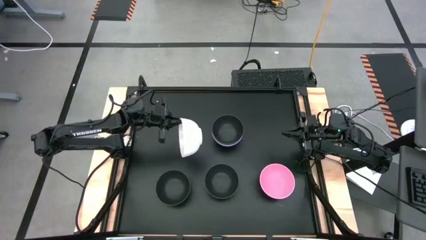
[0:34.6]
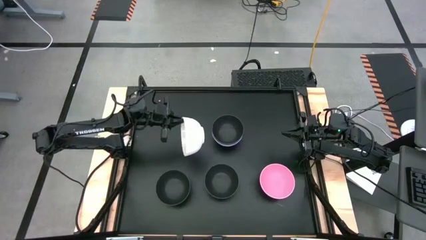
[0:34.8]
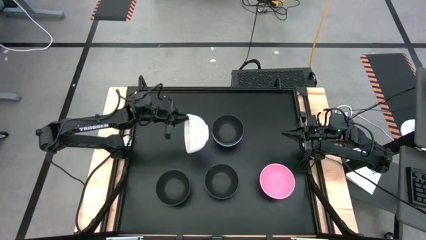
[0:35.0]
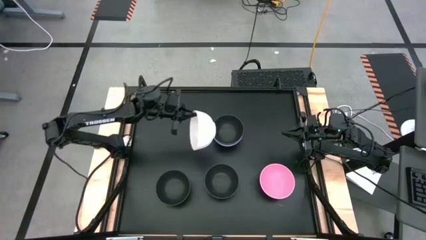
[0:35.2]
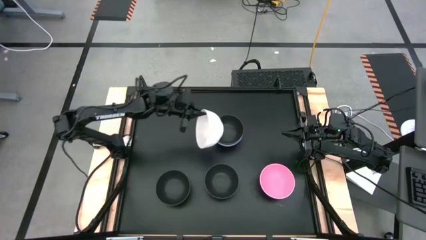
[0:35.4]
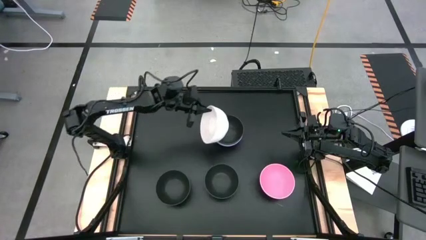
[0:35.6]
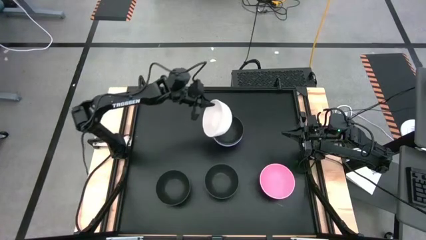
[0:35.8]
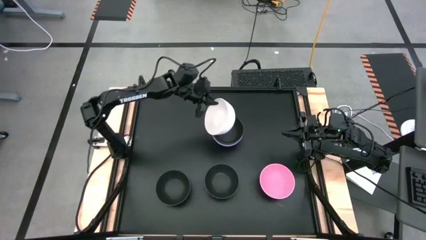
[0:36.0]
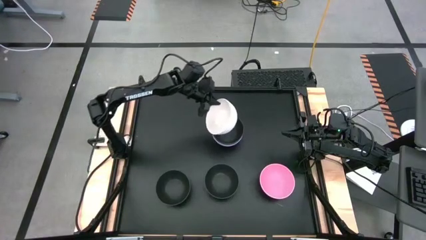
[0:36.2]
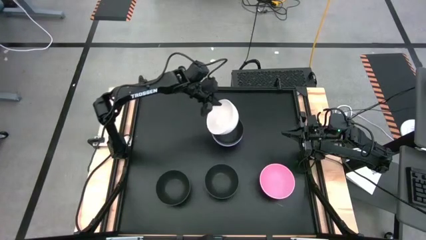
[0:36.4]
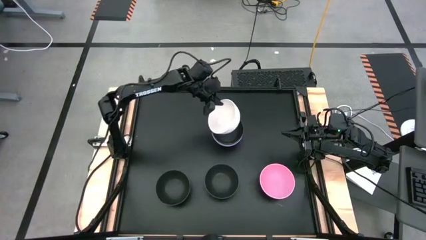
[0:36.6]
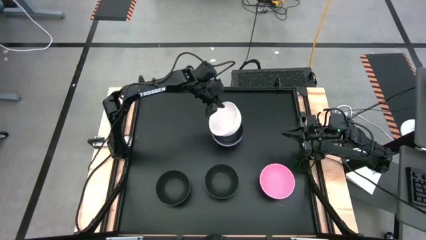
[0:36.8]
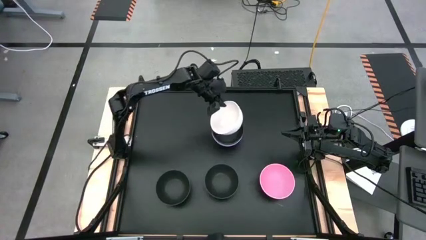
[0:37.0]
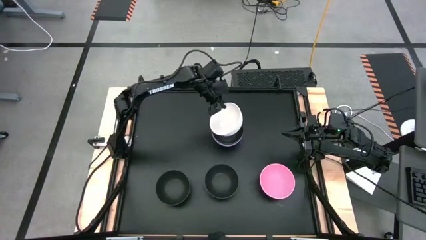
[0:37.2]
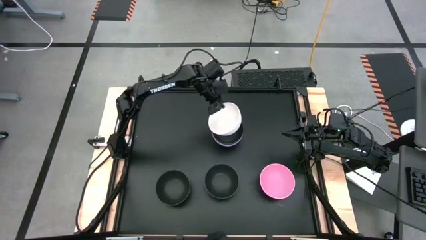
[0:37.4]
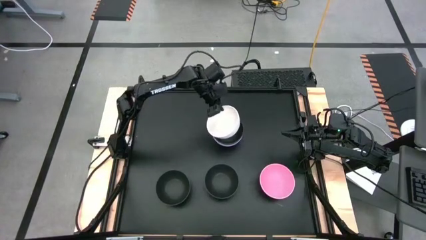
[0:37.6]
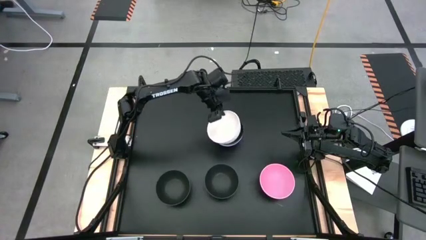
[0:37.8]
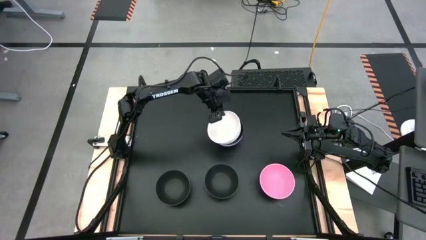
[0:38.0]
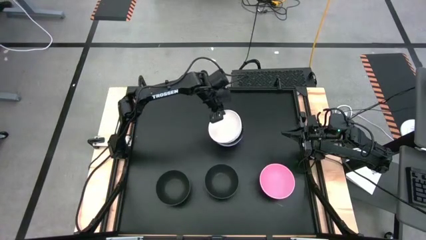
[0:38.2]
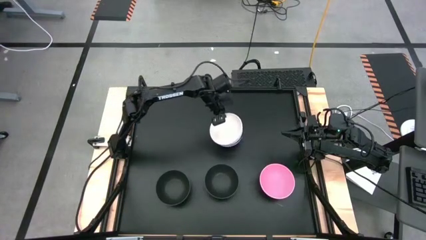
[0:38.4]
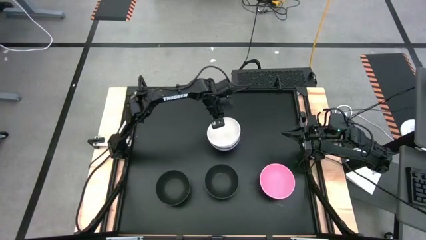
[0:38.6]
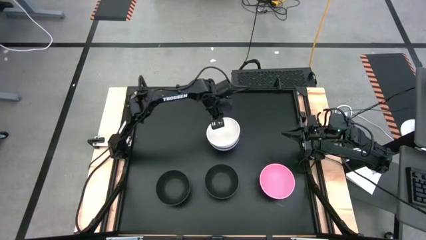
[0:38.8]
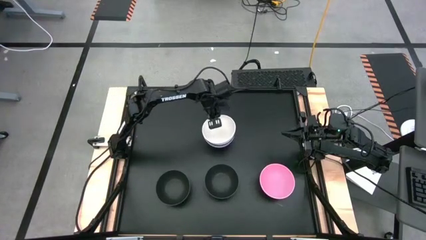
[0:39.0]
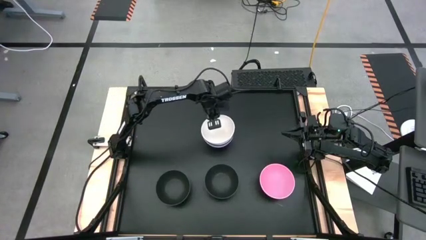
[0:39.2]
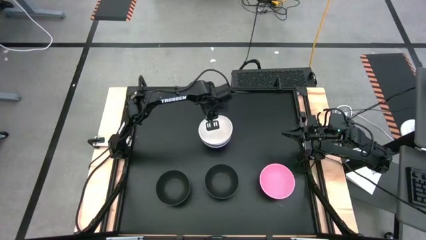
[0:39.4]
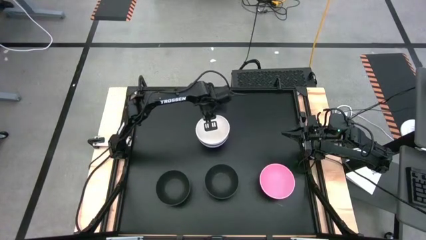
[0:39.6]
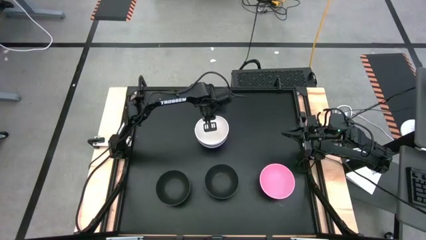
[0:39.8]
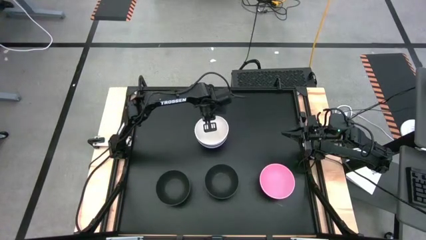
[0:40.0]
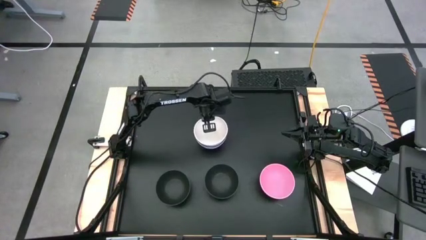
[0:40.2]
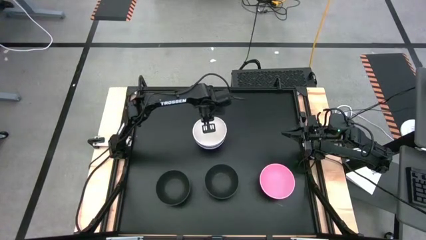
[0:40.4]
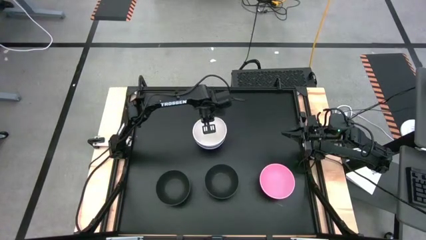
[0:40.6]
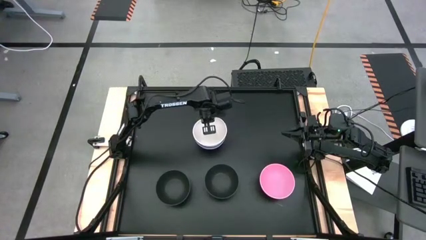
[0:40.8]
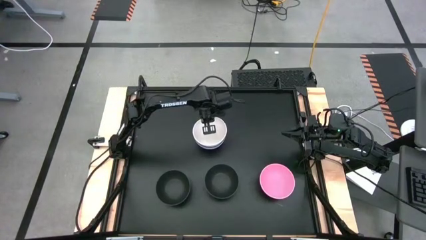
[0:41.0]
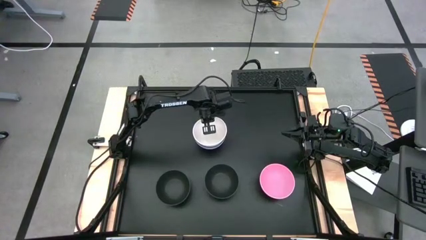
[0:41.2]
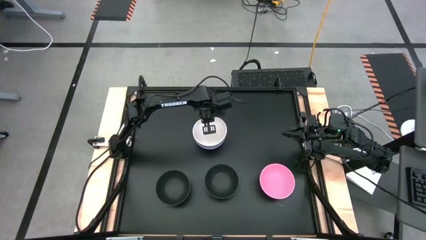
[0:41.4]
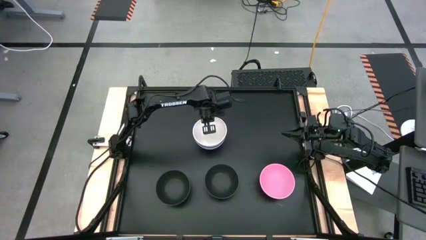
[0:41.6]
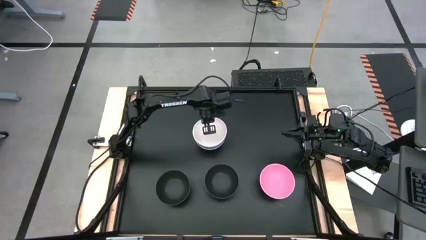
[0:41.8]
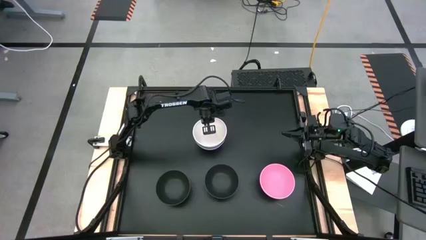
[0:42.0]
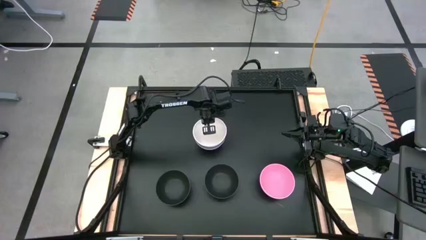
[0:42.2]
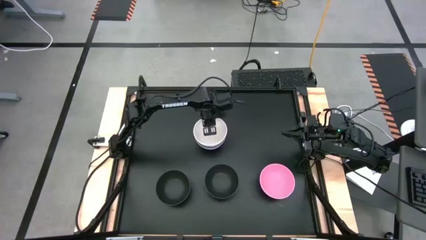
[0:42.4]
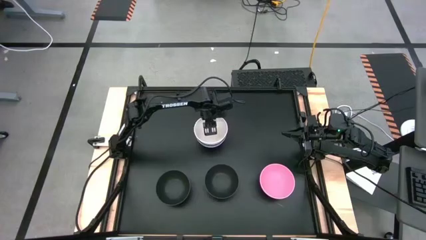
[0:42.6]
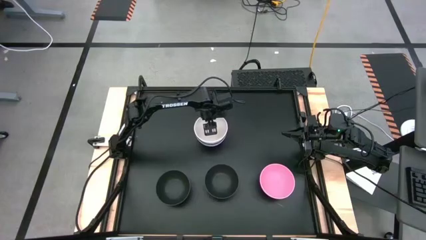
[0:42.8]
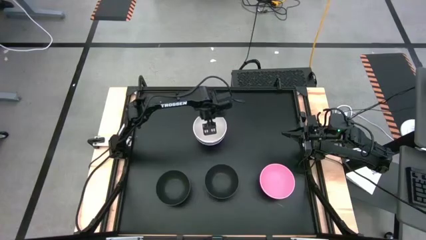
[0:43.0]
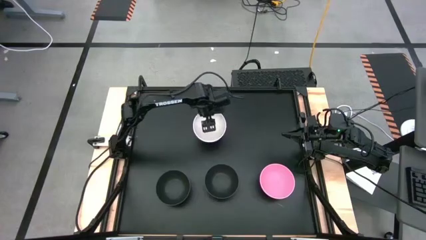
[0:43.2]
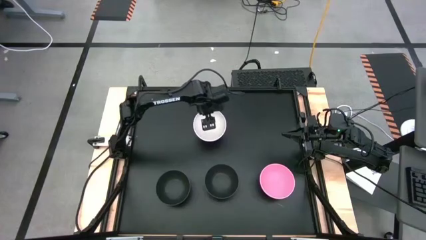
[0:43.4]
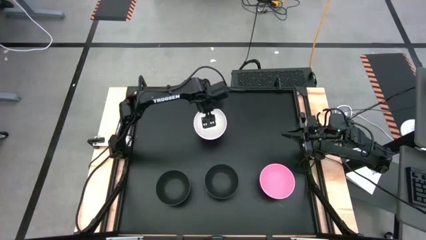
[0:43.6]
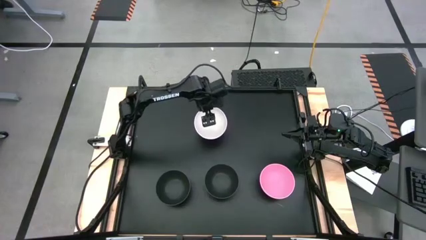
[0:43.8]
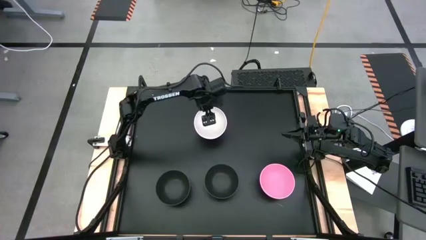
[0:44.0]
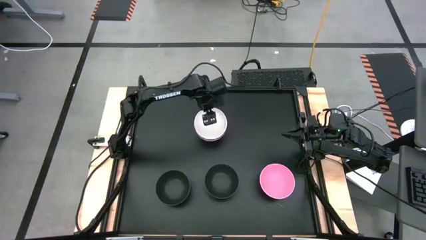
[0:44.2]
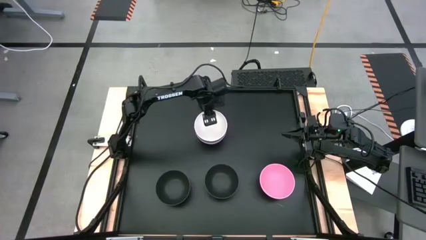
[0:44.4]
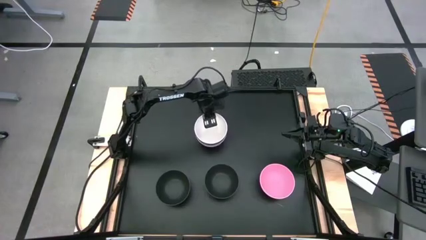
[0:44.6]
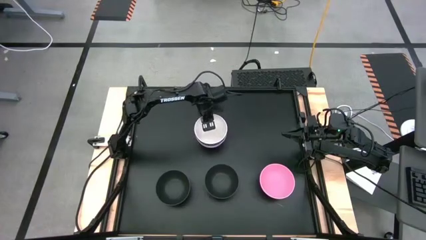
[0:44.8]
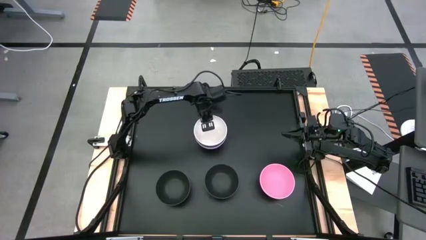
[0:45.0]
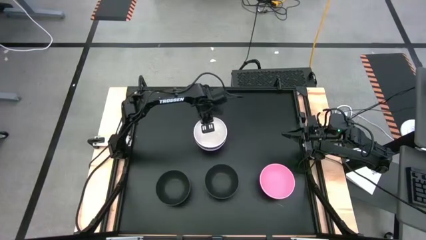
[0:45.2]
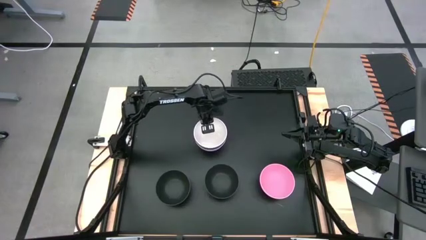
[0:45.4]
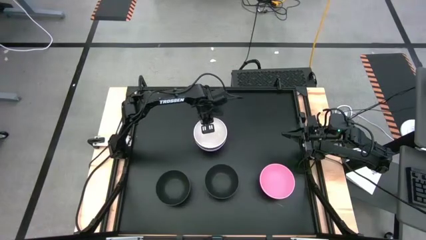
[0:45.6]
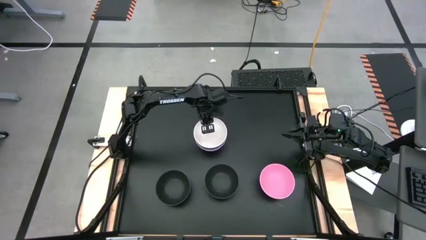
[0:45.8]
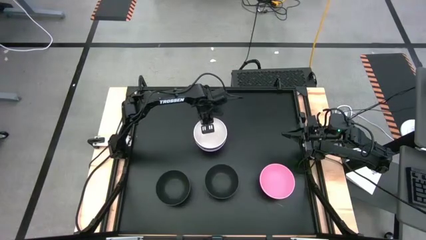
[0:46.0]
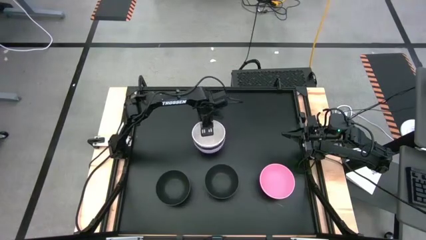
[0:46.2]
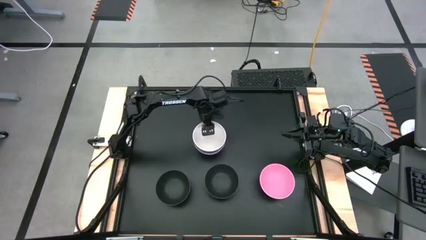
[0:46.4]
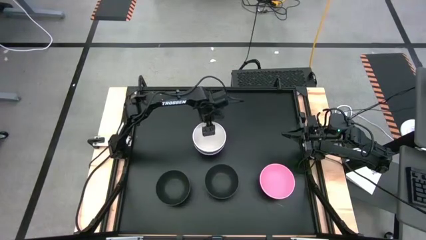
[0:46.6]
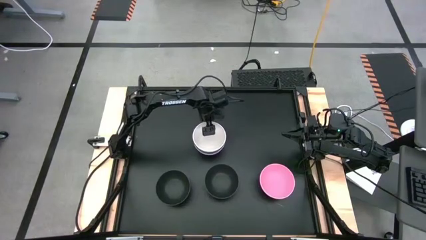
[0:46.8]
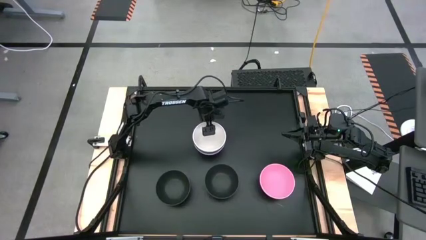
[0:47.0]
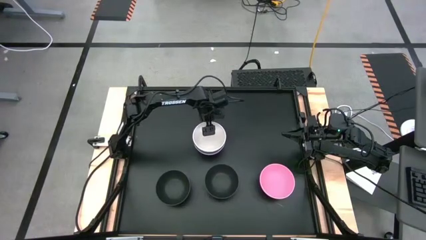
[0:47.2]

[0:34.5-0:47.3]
Task: Nest bowls inside each other
Stack the white bowl on top of the black bowl

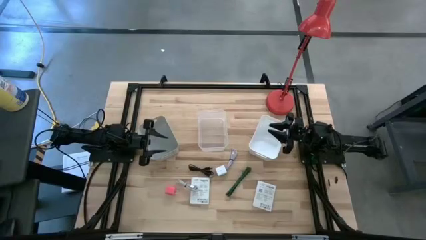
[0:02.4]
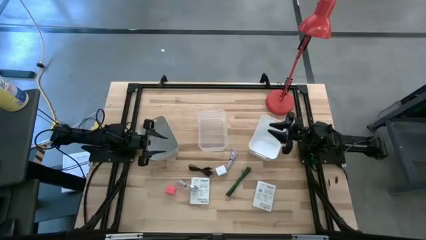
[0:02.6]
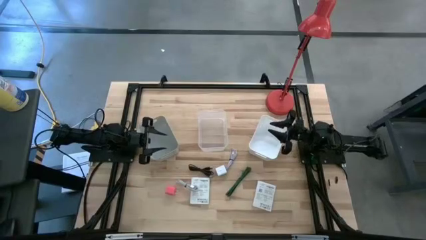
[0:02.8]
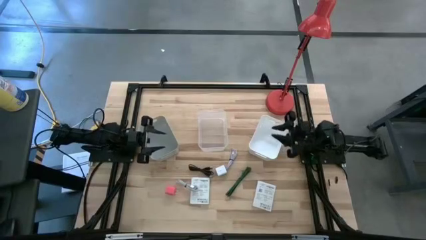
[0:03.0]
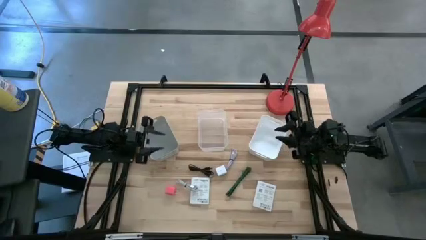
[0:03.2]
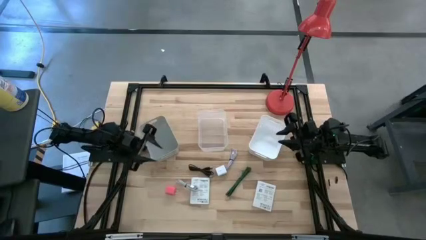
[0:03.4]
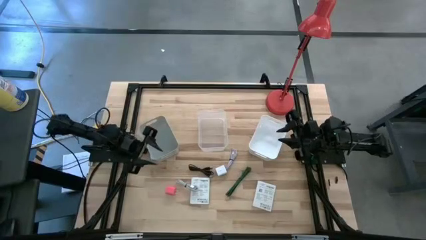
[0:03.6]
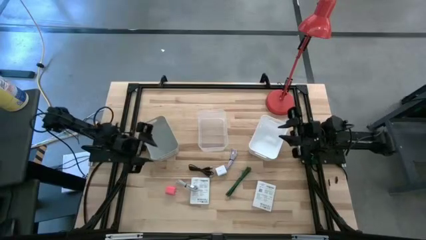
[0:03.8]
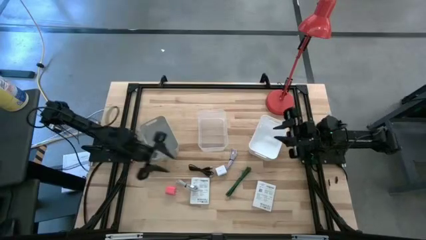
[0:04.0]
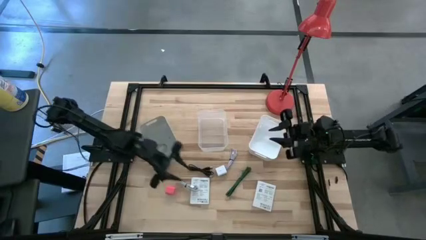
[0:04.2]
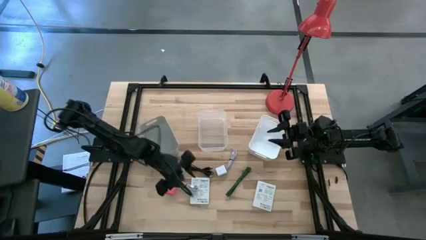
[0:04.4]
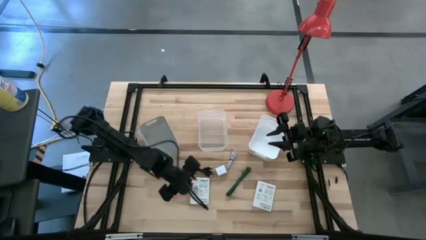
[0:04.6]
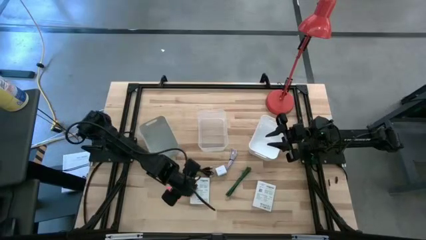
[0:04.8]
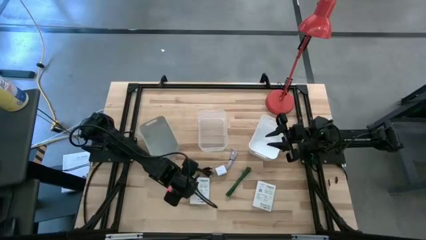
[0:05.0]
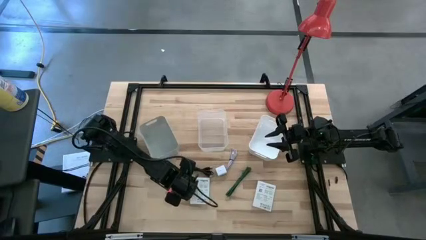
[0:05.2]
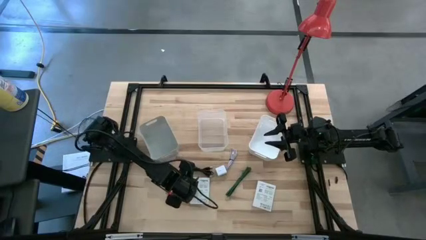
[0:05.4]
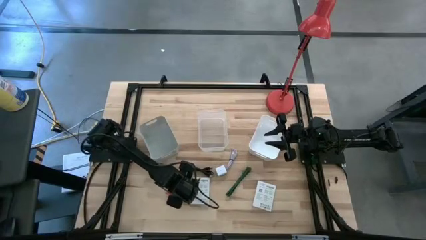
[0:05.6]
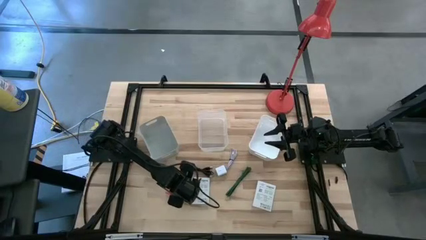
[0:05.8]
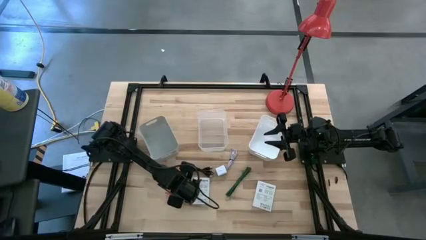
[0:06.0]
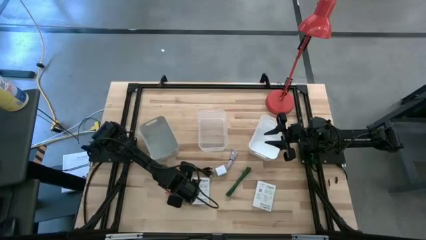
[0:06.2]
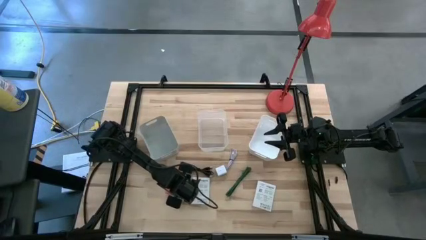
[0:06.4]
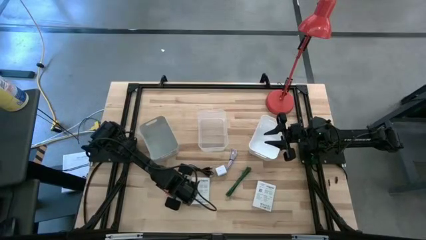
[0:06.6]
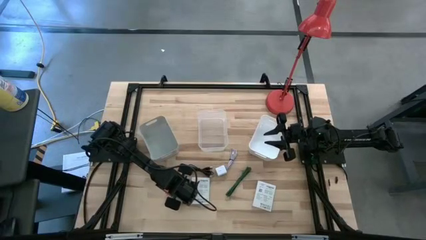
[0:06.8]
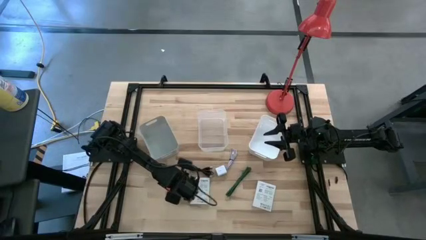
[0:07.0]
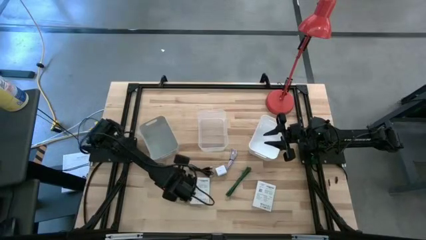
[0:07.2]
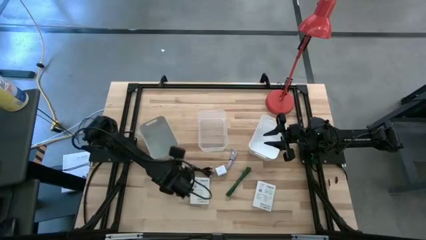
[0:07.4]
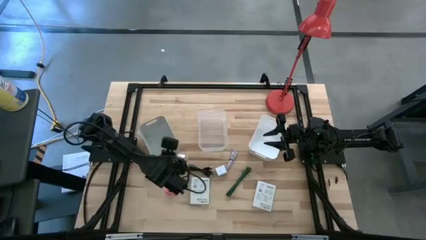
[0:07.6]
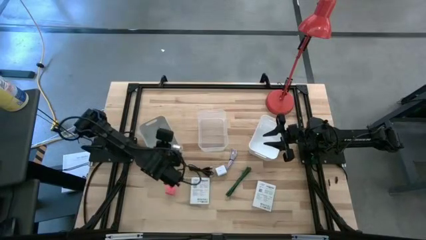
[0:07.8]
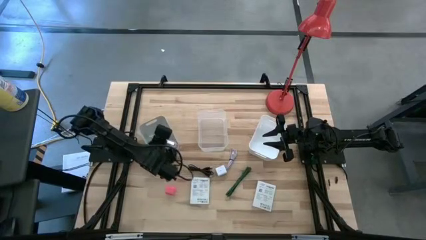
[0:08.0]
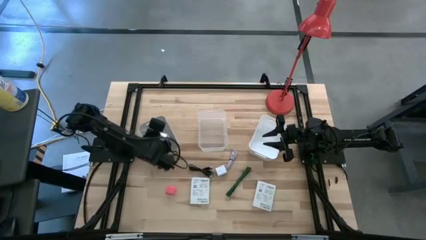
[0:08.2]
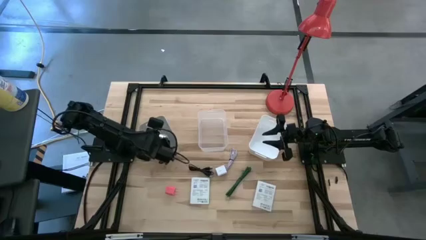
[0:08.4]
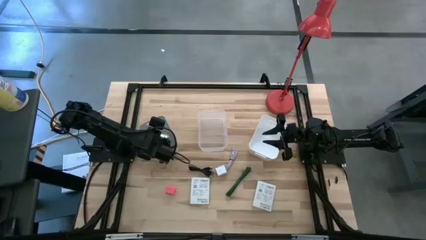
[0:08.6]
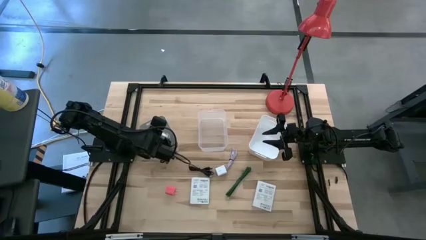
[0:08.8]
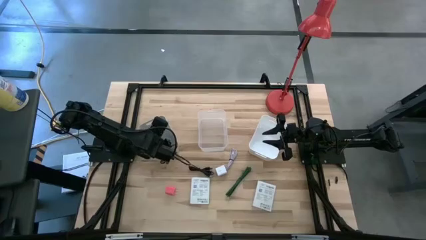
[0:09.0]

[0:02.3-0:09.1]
Task: Pick and place items into bin
Put the white charger cable into the gray bin
